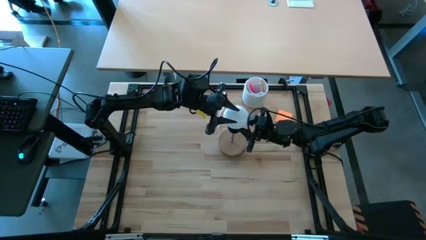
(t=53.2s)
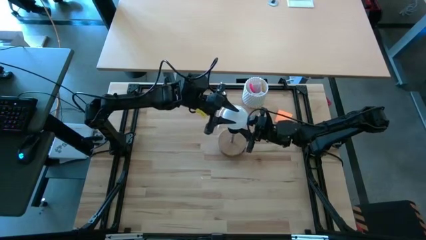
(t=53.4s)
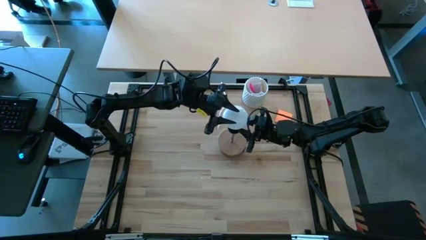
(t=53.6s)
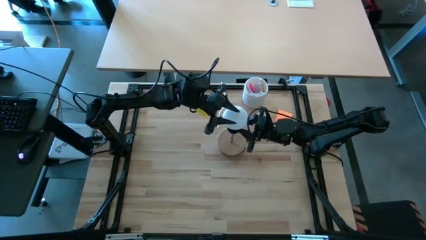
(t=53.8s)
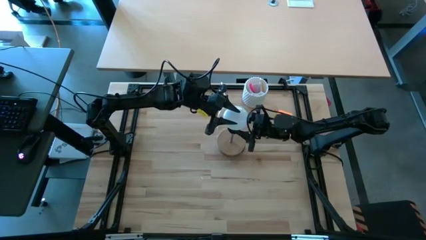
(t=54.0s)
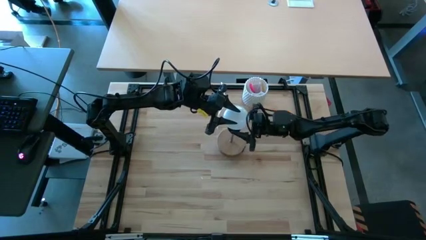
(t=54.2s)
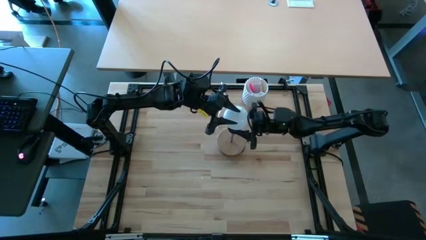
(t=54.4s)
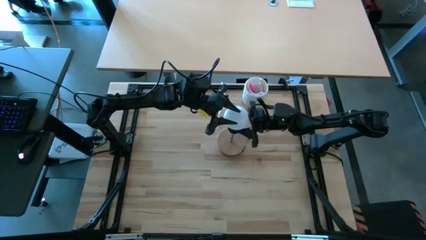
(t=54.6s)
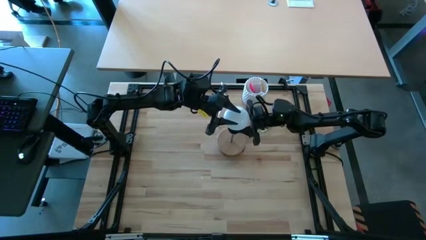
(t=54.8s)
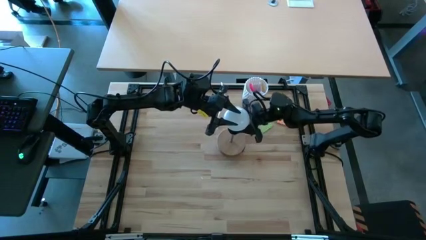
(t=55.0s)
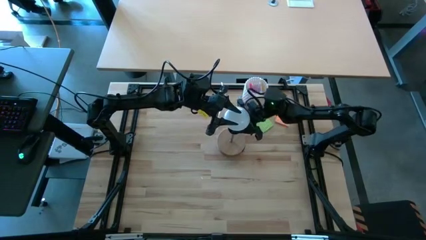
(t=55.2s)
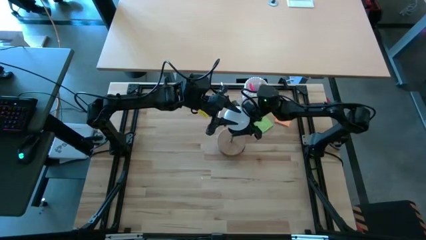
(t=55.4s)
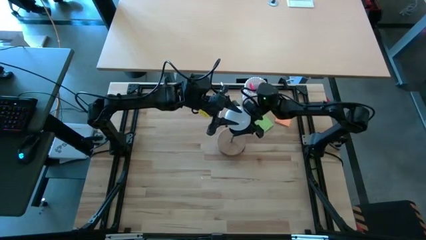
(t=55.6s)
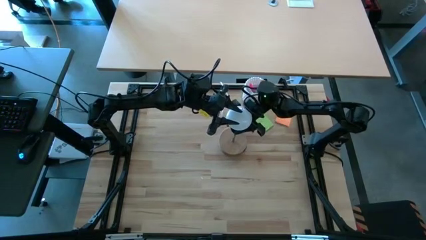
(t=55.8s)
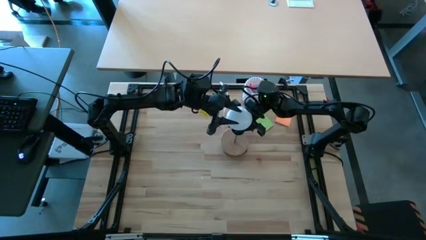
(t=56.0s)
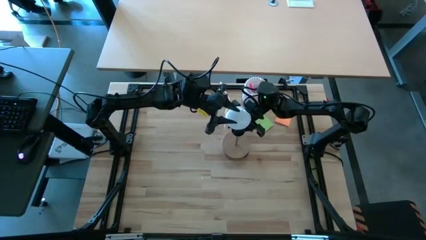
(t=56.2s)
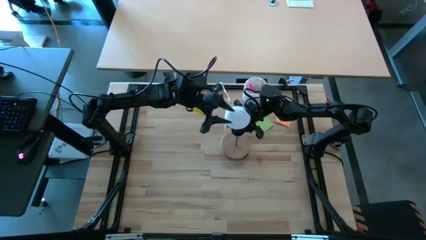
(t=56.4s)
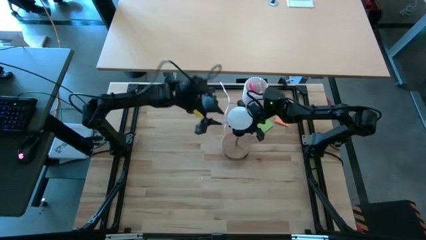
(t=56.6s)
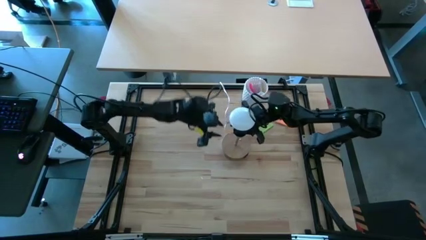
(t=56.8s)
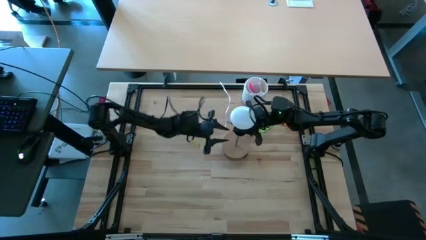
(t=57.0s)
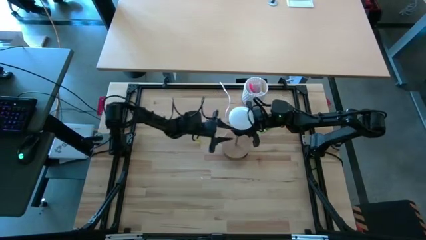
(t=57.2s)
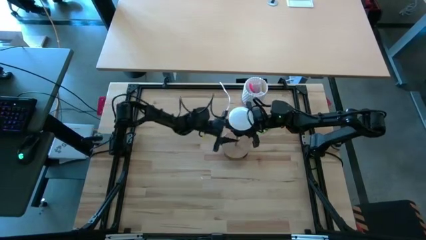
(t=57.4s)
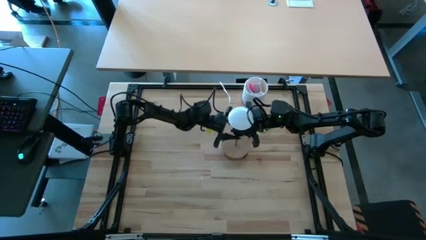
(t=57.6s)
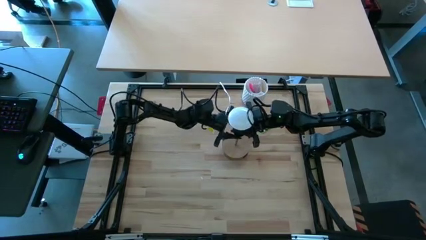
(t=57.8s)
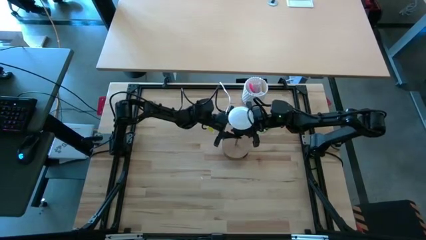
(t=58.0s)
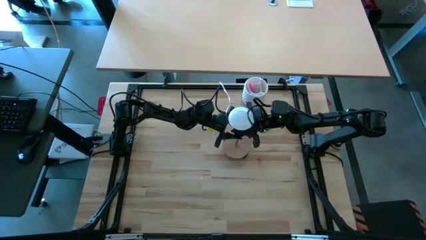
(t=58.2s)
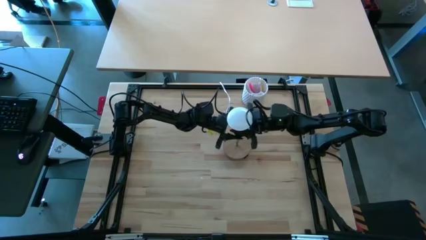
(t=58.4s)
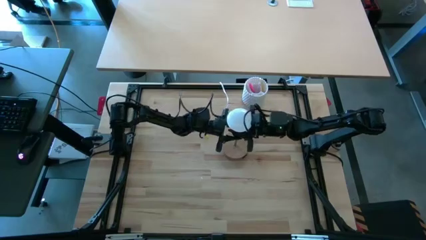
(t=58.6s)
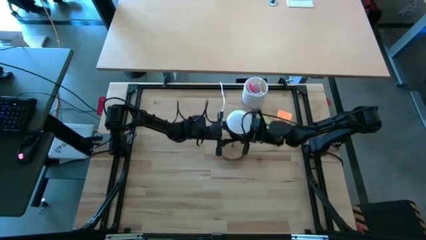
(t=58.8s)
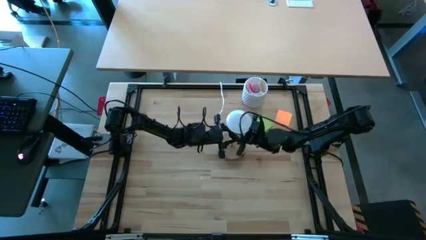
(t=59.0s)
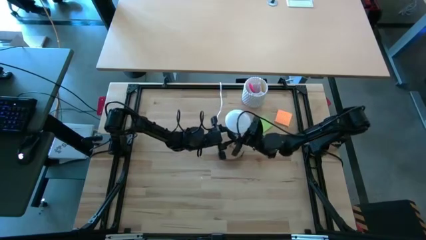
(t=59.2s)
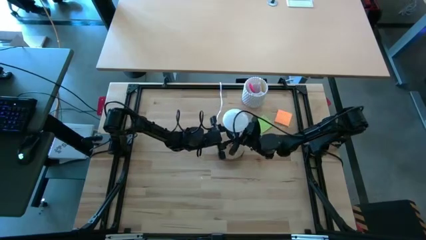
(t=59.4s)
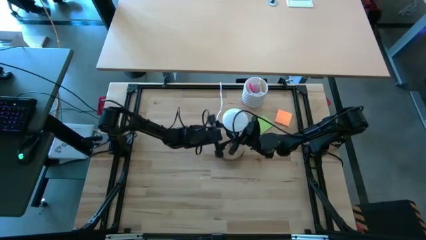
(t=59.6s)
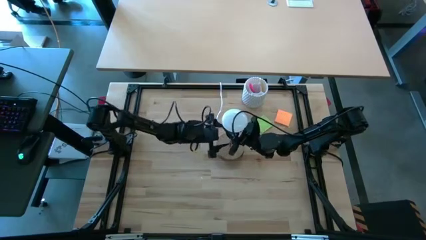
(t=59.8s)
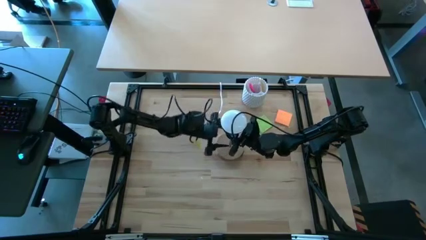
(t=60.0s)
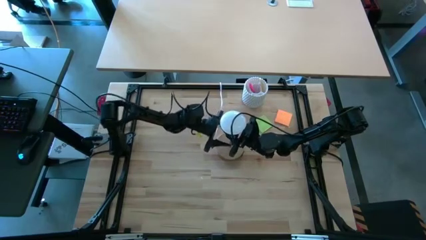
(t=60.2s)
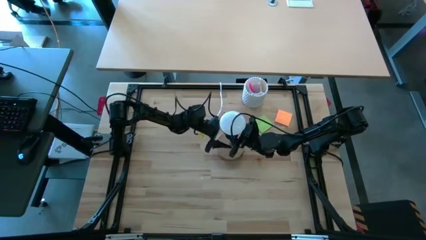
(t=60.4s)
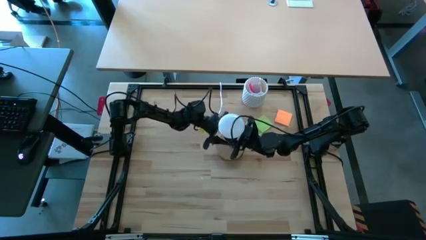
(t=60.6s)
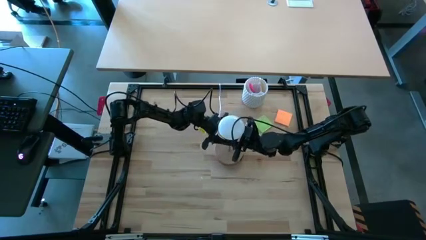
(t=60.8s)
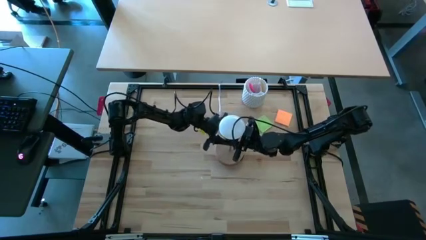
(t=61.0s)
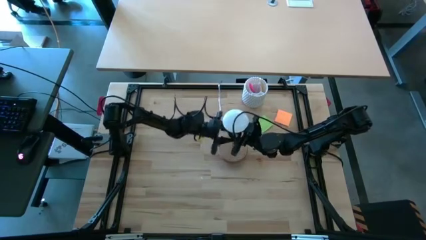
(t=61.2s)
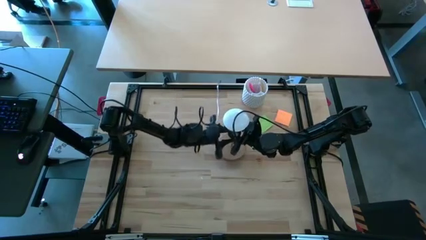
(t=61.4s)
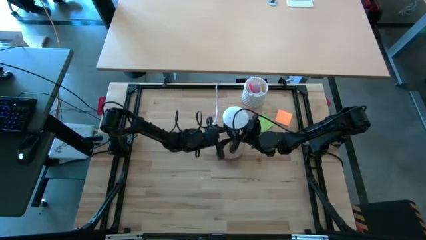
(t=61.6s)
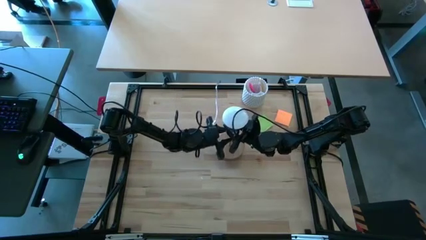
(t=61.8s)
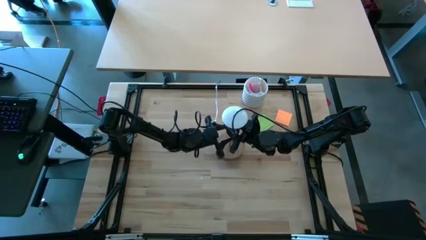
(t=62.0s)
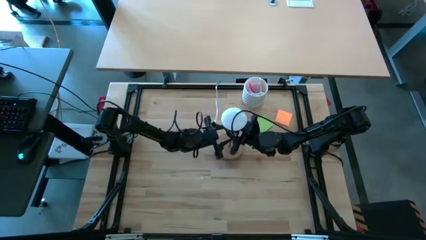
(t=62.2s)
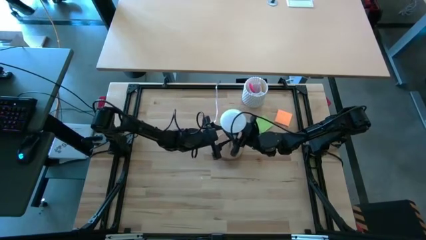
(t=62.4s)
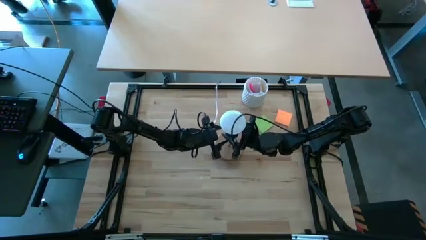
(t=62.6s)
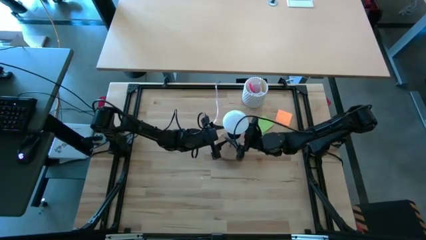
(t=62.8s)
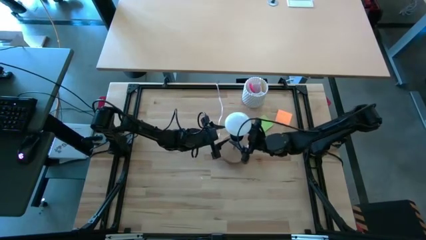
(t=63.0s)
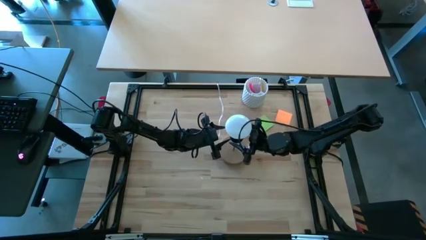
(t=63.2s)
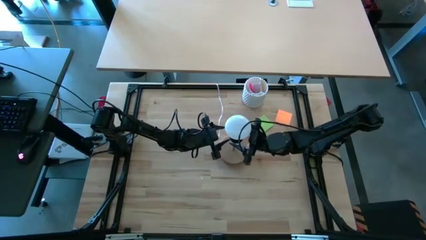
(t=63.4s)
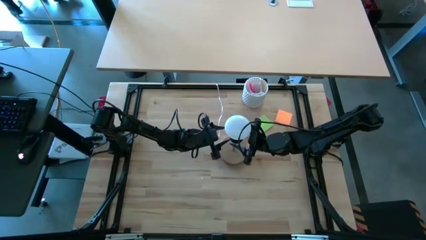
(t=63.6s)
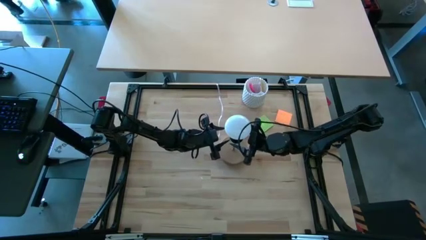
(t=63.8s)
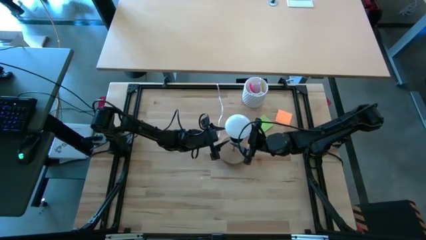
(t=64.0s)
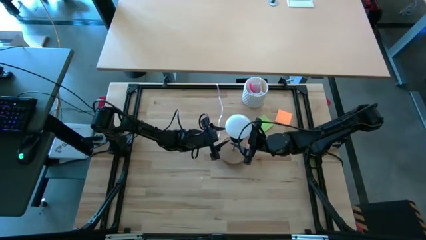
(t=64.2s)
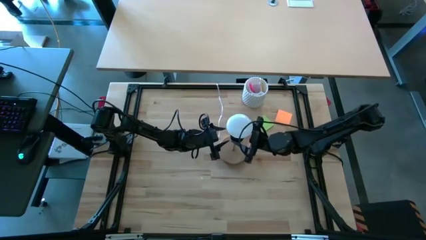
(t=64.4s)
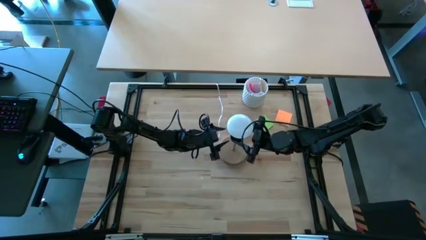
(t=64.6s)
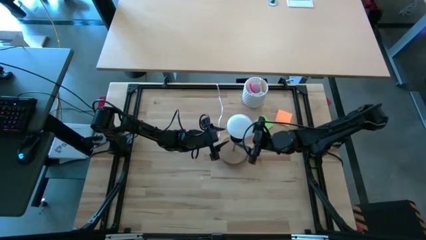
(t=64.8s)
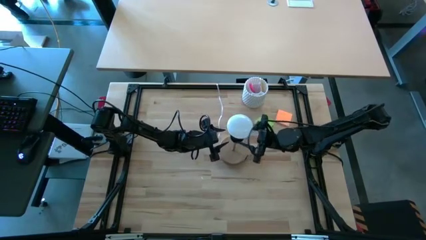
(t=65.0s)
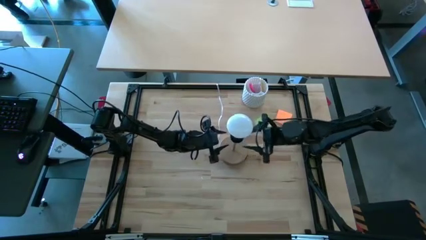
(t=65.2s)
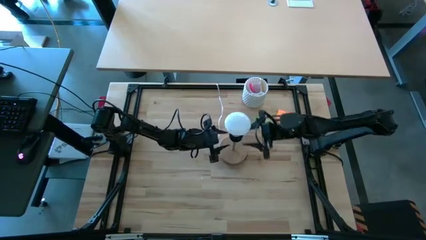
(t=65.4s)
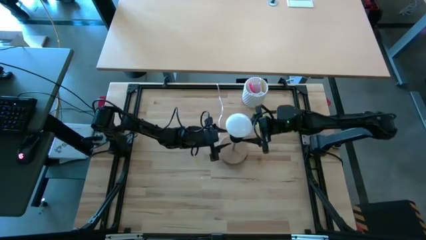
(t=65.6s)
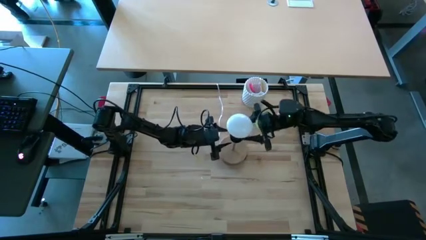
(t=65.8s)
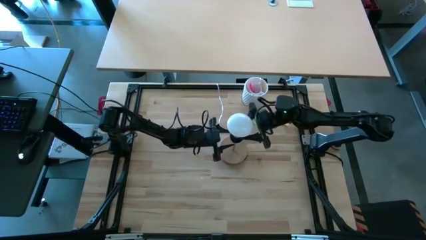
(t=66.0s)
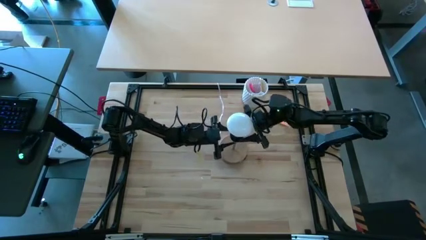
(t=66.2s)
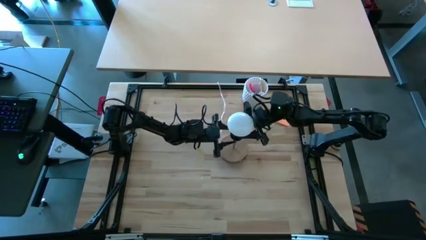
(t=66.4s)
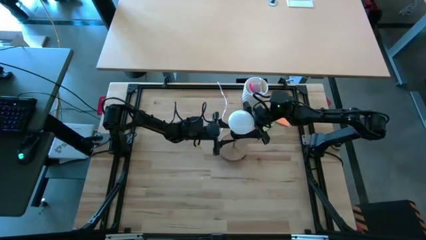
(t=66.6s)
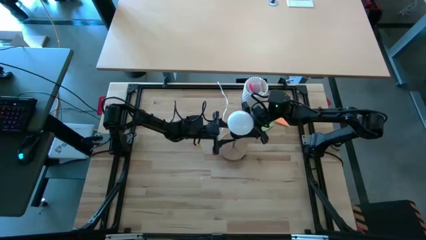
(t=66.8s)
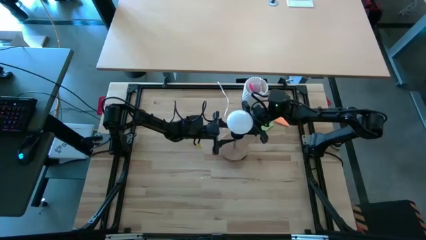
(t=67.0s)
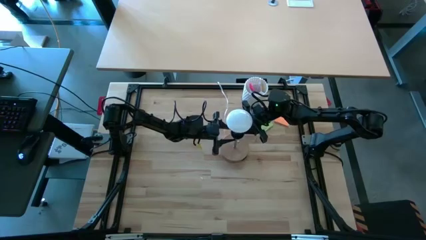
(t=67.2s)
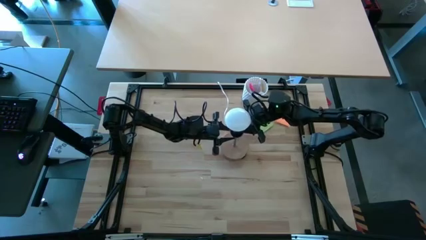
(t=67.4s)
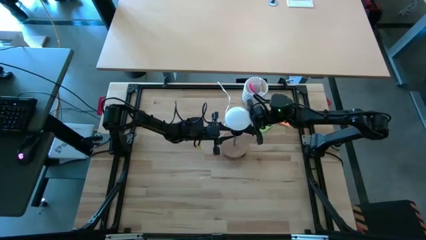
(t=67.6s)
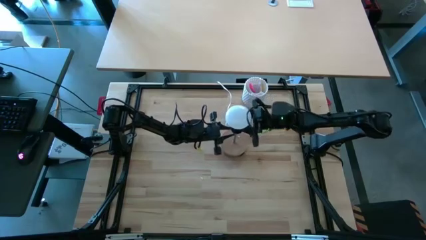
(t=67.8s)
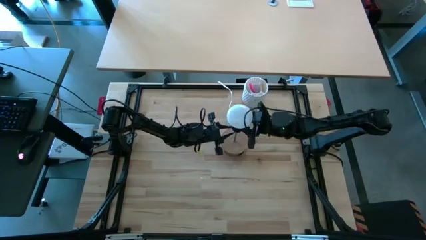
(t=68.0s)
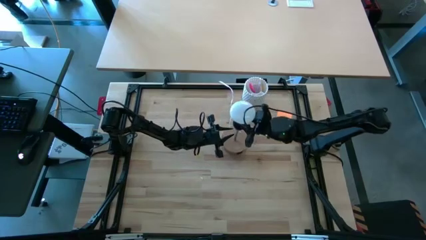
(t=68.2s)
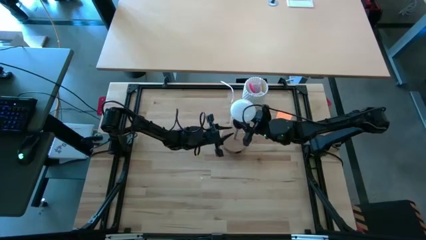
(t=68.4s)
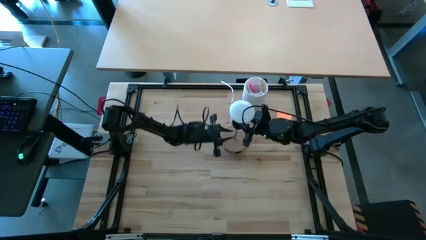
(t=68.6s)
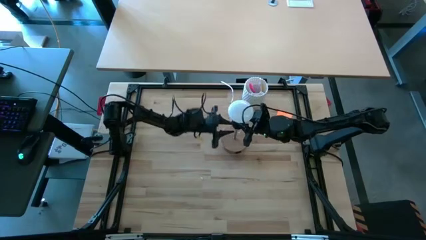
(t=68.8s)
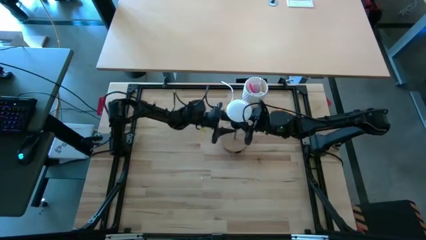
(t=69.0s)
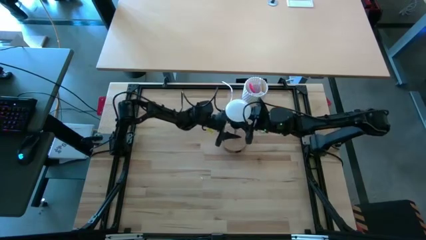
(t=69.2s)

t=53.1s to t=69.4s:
Task: Screw lightbulb
Insert the white lightbulb into the brown lamp
